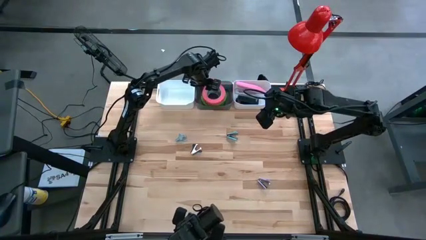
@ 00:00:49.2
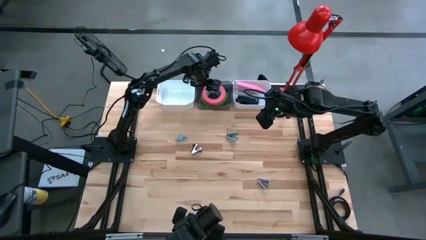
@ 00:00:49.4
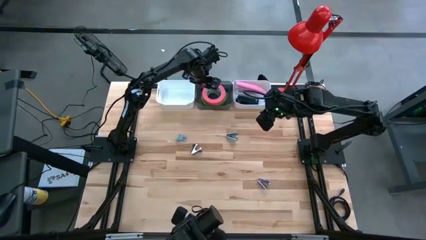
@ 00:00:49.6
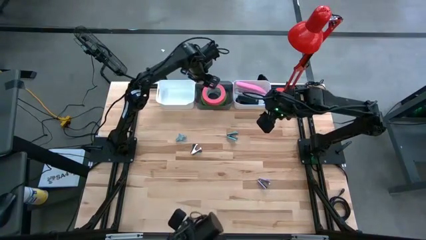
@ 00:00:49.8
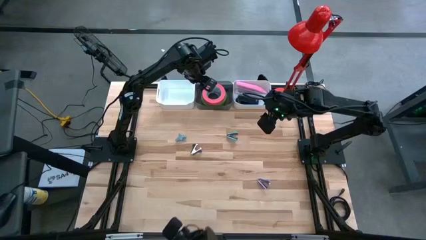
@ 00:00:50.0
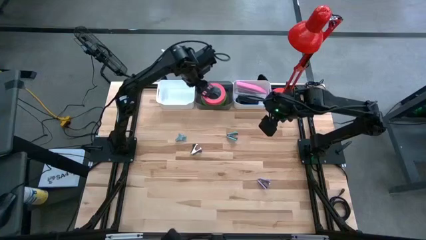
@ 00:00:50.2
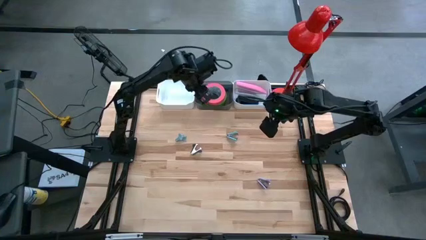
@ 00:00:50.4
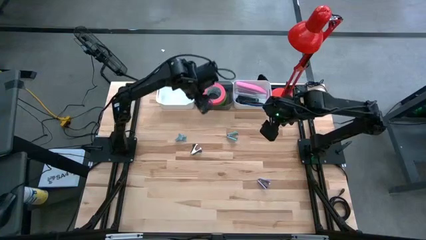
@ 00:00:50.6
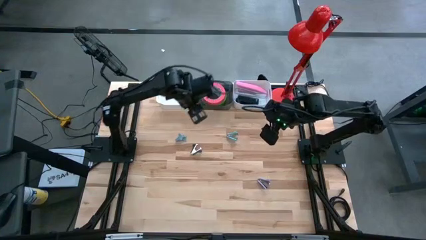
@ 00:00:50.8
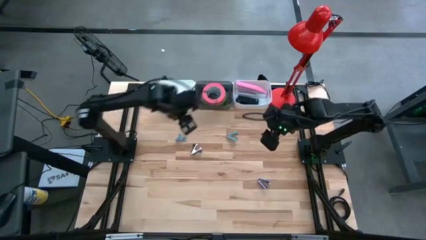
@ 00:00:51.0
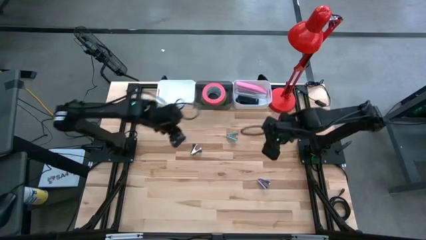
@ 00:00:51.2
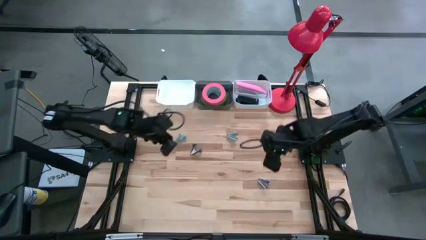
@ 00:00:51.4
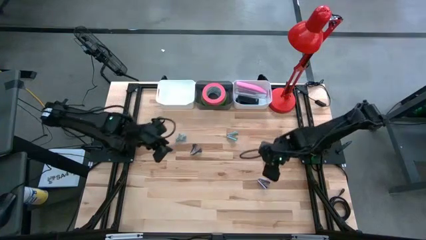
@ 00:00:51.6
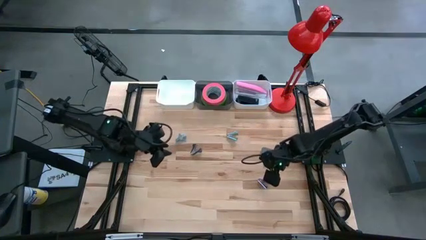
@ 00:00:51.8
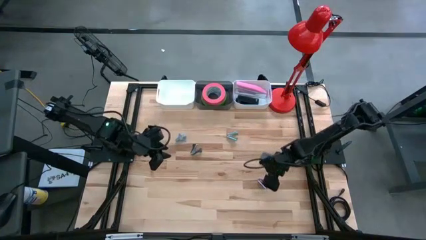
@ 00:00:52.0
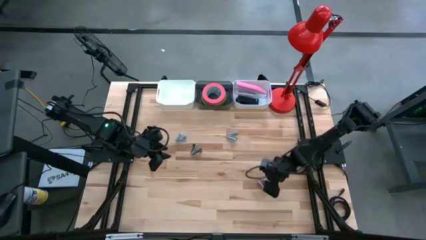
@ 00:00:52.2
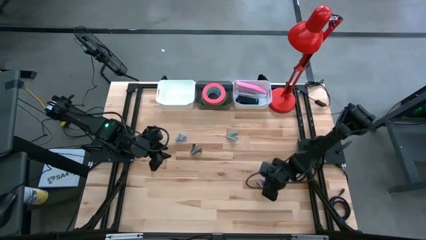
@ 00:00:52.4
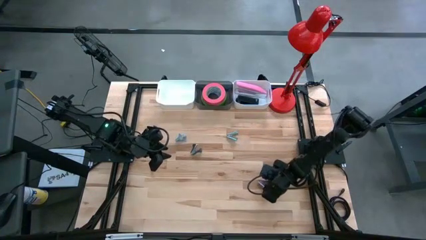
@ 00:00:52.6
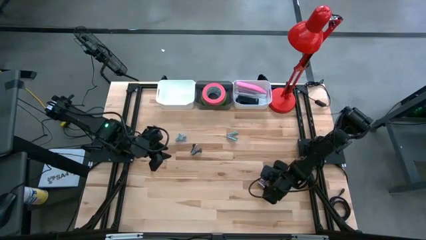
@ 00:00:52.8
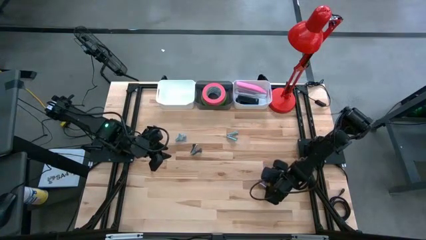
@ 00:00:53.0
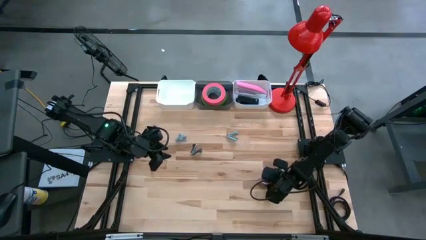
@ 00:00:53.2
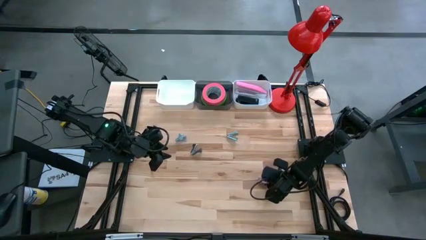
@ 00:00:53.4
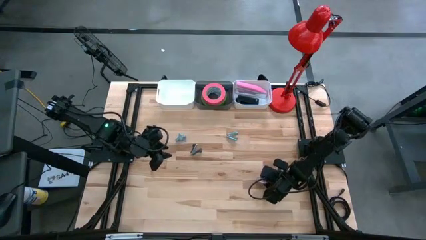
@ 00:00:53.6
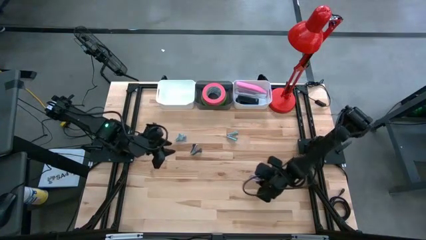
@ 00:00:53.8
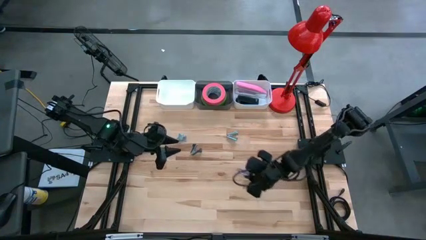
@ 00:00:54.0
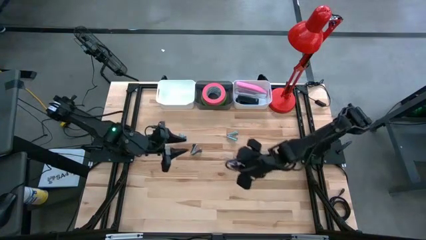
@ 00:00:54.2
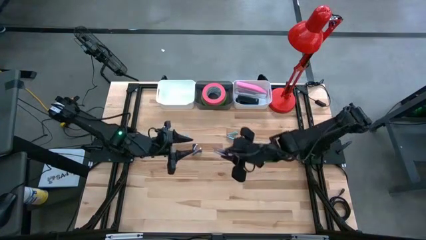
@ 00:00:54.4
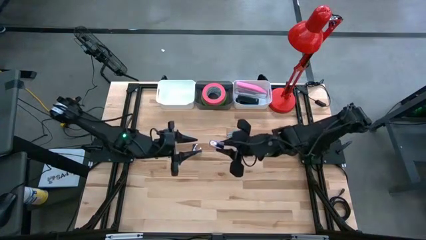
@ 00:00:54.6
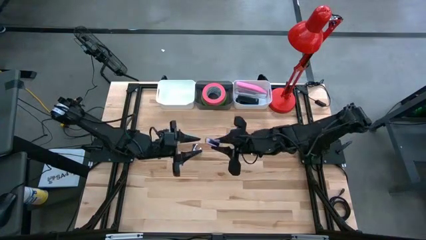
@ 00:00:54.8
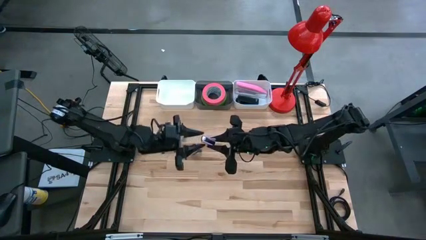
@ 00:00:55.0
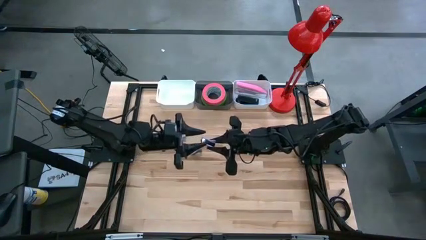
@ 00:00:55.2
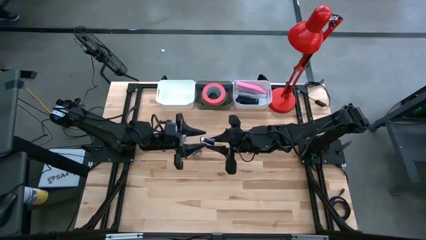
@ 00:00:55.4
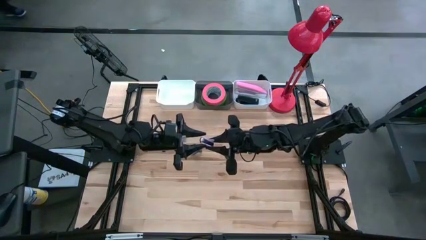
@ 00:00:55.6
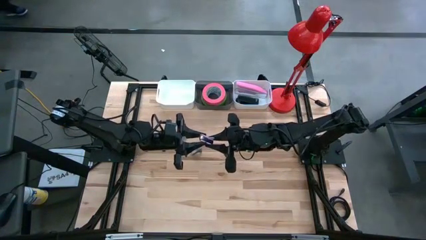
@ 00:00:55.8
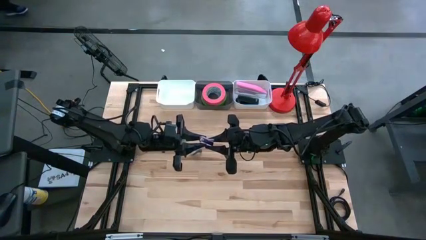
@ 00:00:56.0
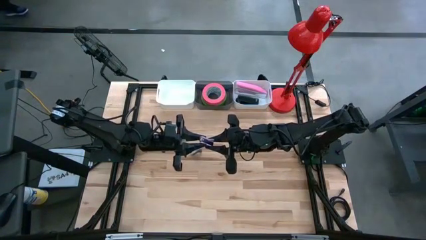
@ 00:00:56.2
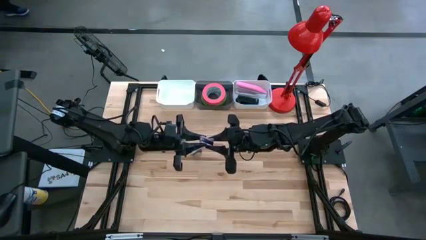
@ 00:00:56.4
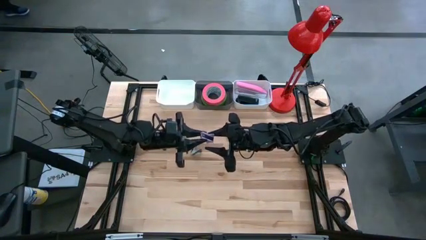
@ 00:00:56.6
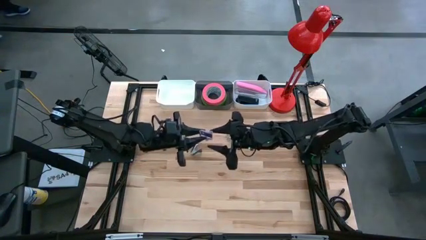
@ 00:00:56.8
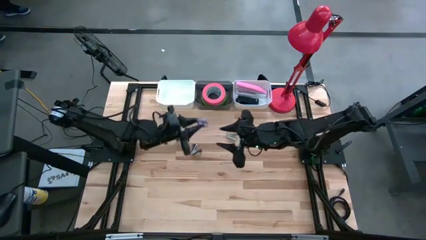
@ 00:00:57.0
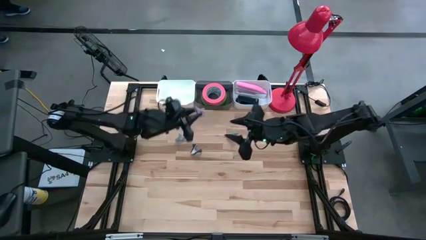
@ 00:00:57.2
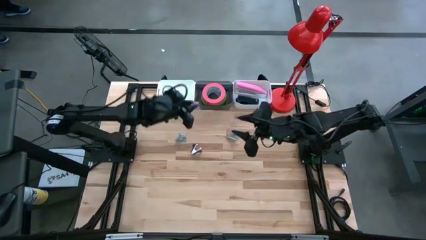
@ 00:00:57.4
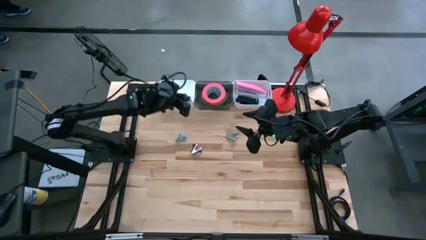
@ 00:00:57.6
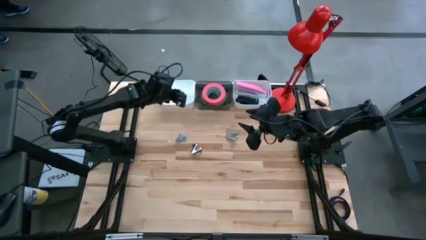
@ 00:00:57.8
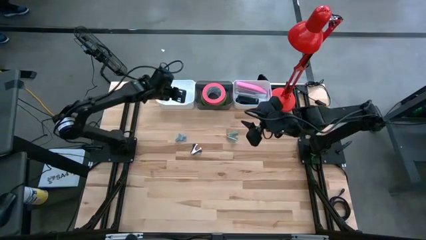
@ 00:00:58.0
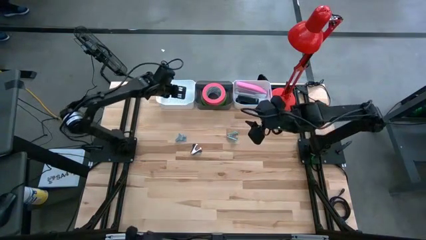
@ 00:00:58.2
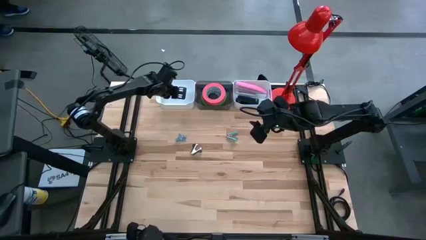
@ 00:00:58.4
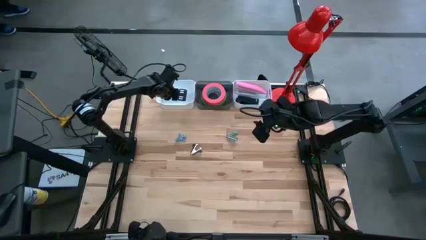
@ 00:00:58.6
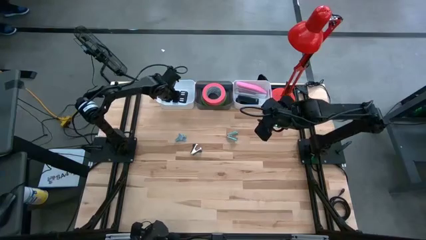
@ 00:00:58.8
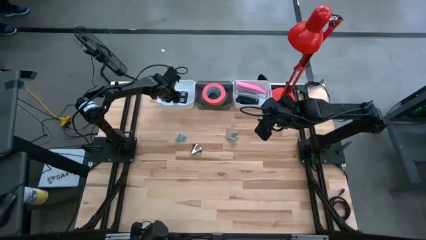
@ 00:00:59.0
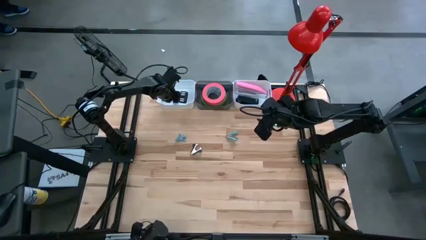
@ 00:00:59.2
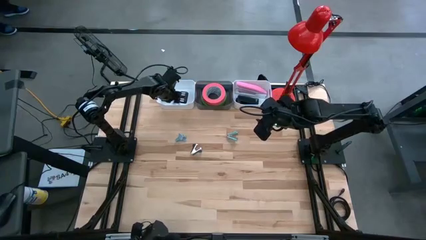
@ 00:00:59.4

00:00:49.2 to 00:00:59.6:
Task: Pick and place Stapler, Stapler remover, tape
Put the purple staple remover into the left white bin

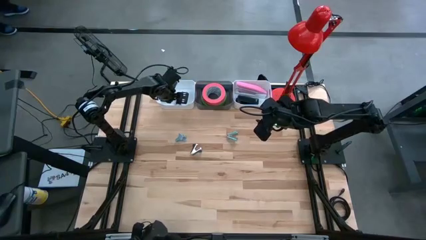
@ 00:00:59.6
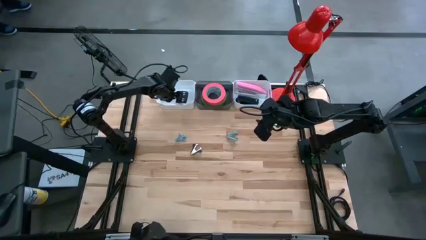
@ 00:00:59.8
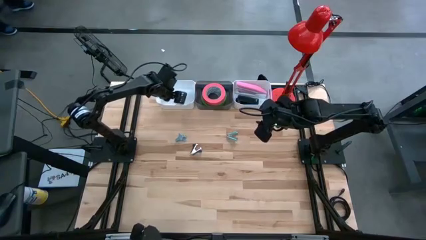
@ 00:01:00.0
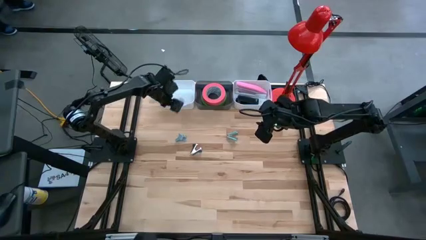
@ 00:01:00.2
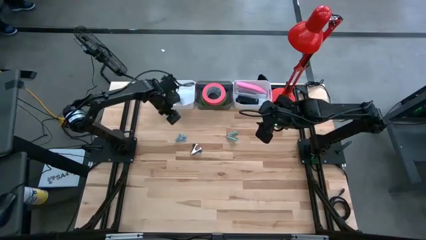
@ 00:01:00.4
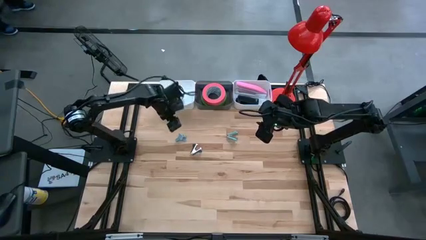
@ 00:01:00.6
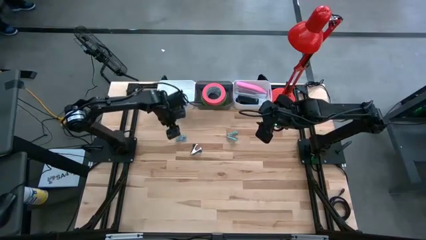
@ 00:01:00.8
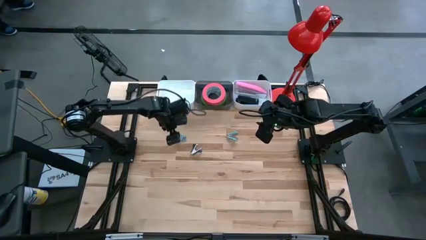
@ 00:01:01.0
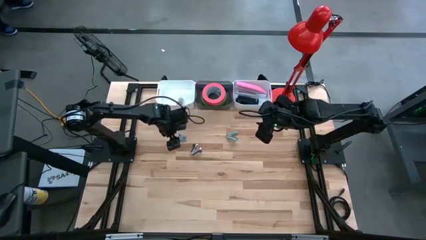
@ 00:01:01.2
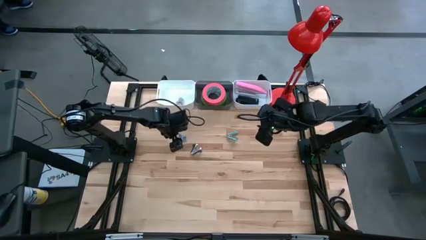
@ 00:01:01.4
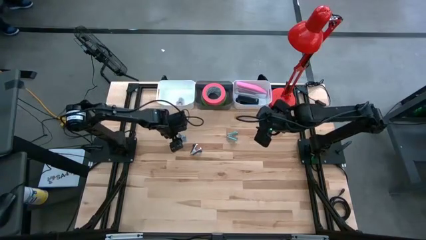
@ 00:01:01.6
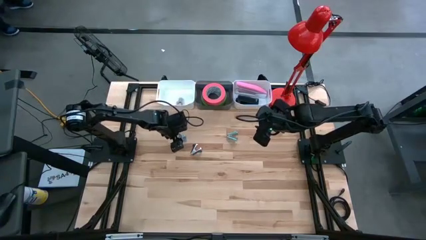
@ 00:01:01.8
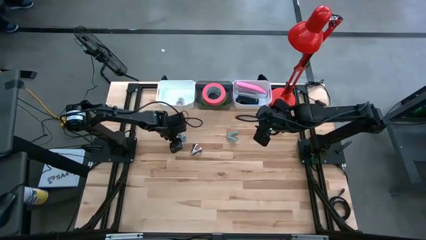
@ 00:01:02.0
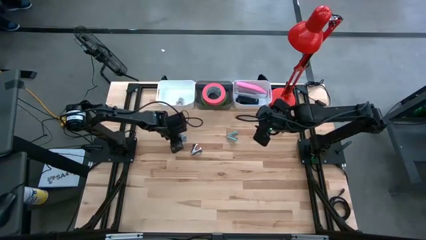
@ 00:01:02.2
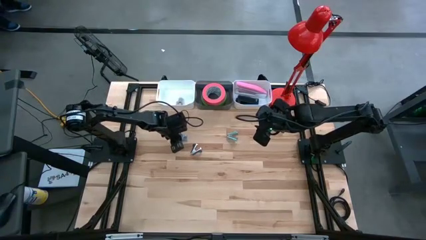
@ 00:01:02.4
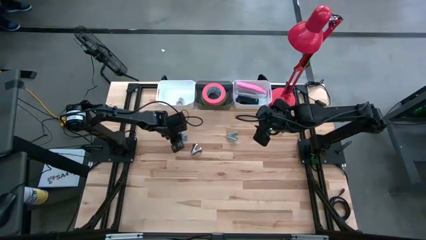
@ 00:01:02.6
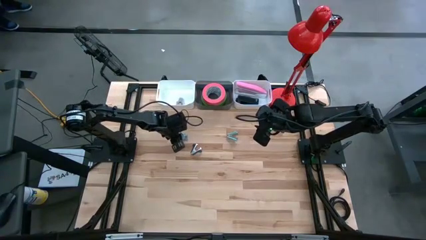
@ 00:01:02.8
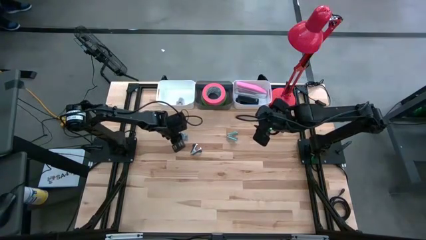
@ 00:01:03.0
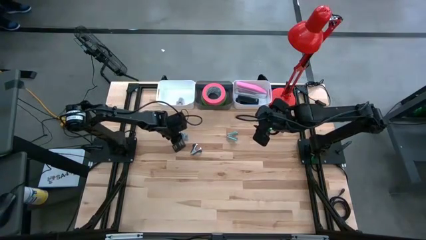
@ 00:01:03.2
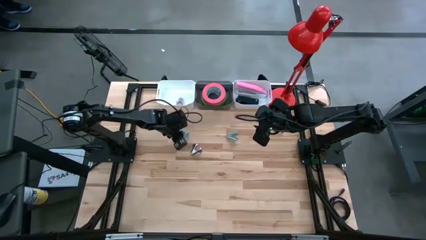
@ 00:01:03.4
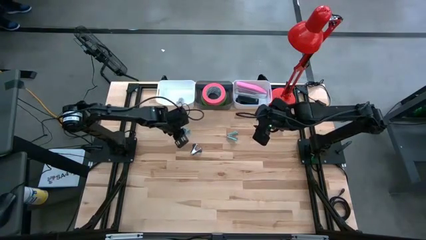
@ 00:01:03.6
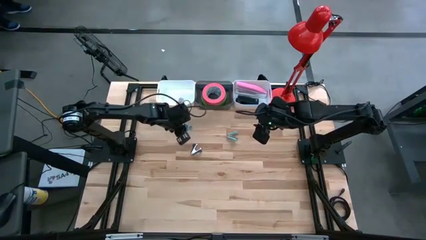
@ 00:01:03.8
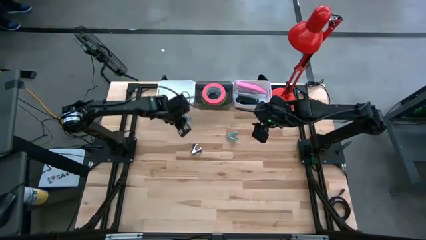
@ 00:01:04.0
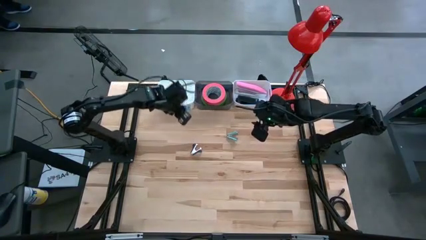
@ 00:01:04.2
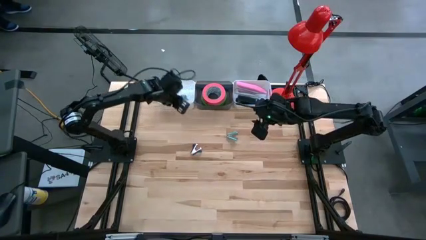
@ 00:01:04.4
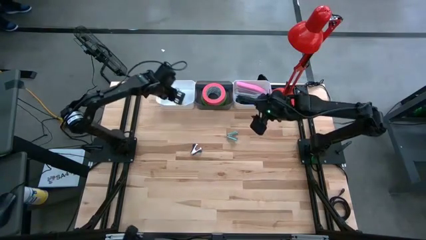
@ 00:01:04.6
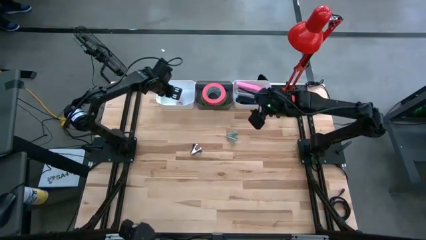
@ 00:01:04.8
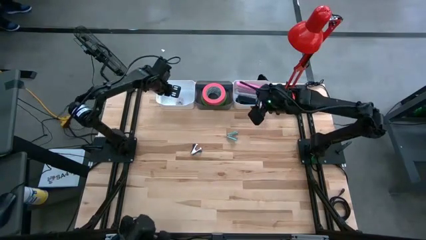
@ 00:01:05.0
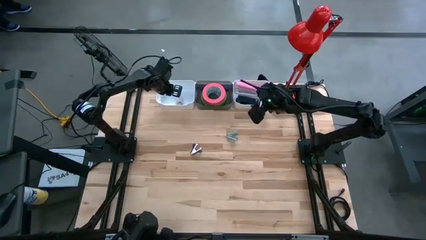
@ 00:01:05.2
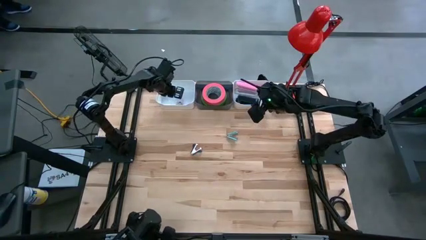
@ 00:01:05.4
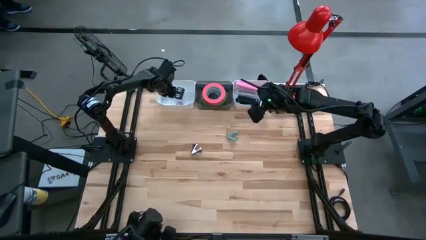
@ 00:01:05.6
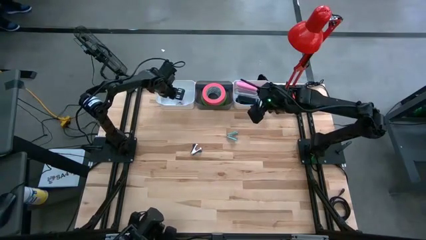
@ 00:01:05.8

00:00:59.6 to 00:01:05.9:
Put the blue staple remover into the left white bin
